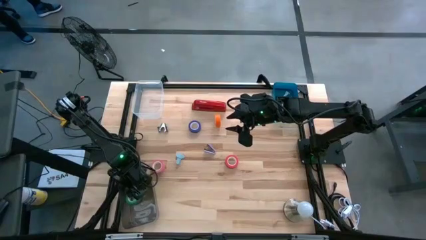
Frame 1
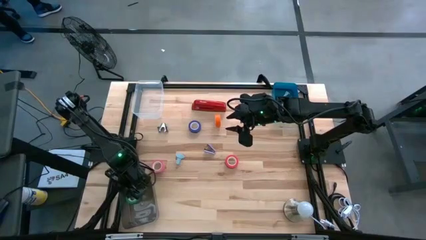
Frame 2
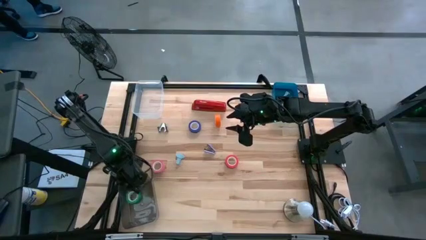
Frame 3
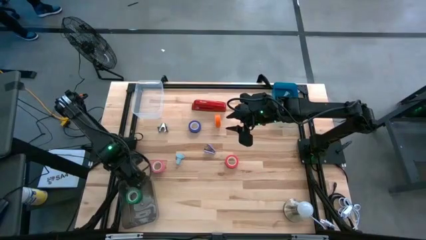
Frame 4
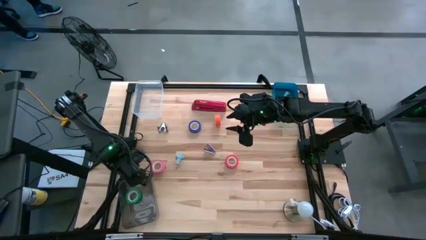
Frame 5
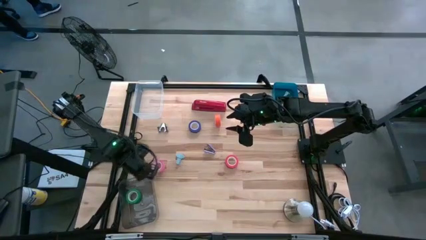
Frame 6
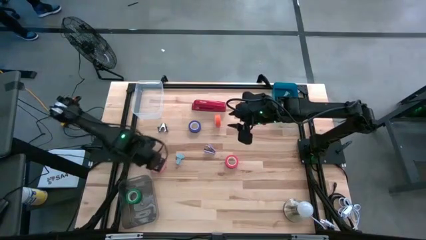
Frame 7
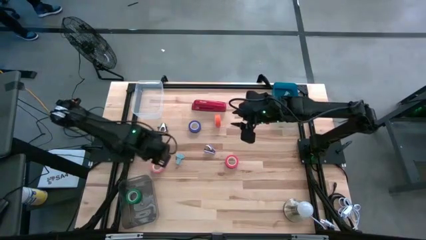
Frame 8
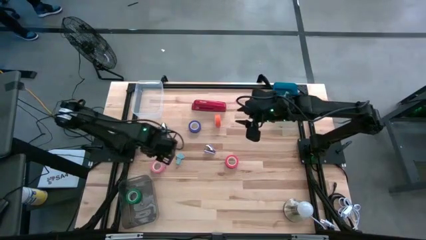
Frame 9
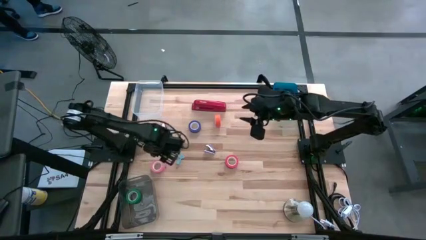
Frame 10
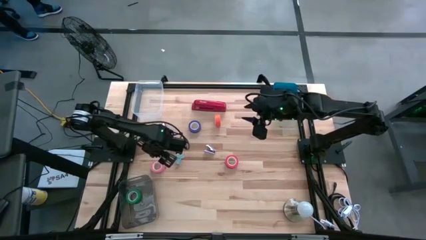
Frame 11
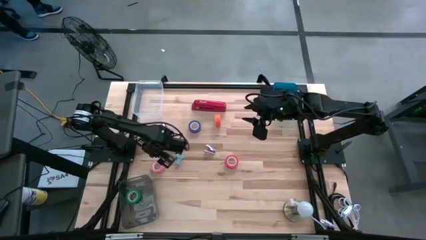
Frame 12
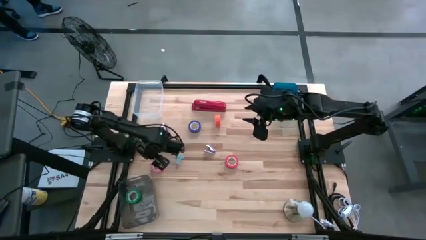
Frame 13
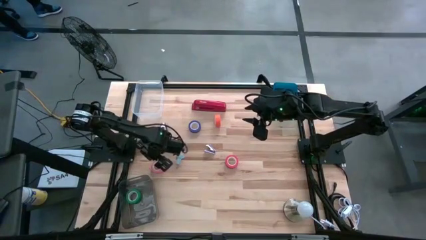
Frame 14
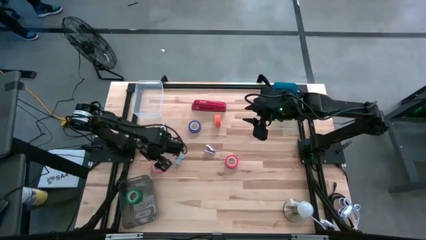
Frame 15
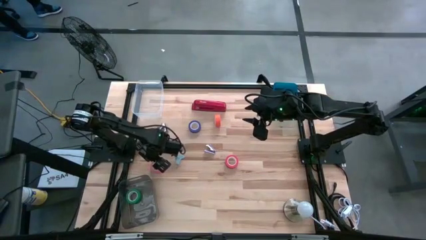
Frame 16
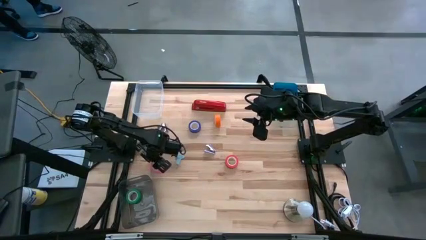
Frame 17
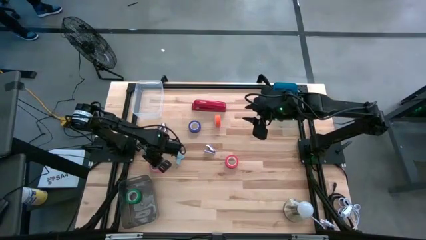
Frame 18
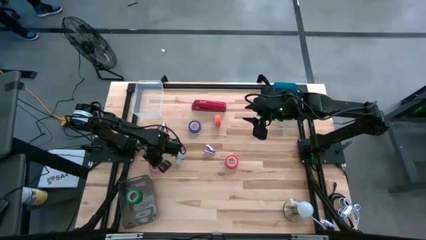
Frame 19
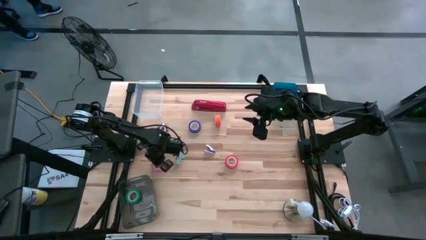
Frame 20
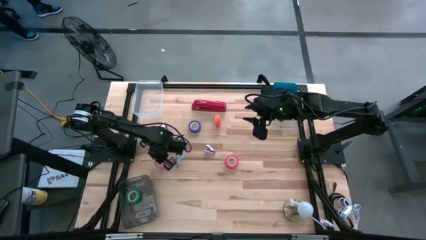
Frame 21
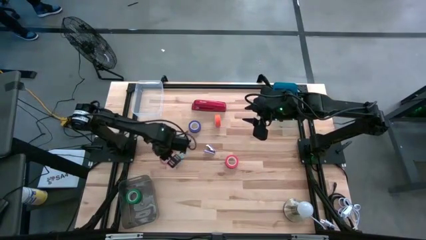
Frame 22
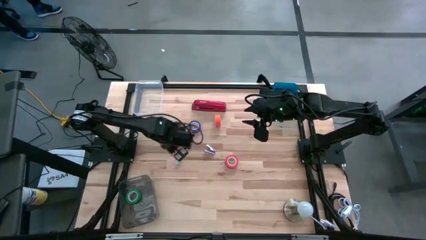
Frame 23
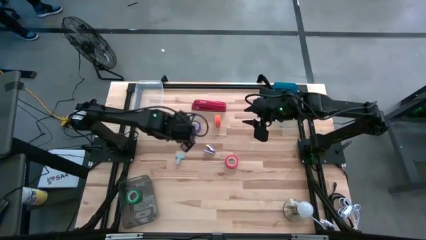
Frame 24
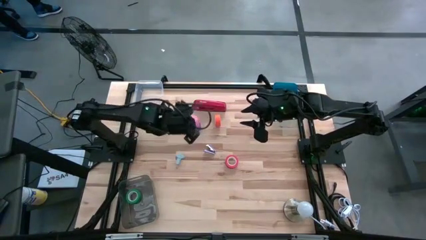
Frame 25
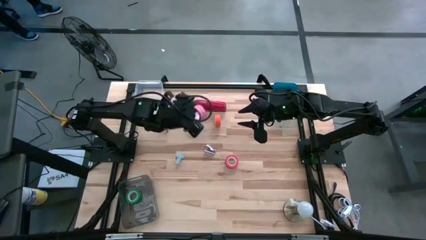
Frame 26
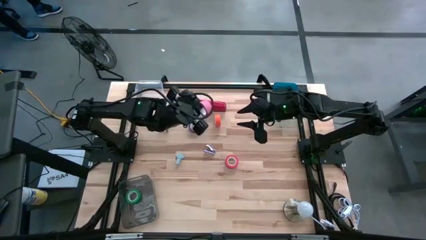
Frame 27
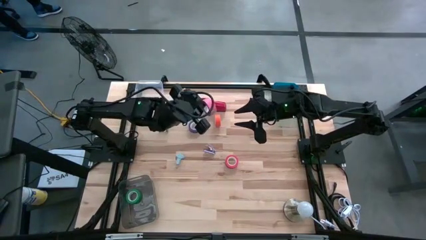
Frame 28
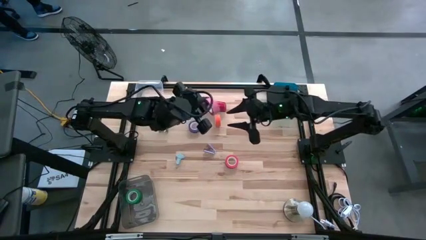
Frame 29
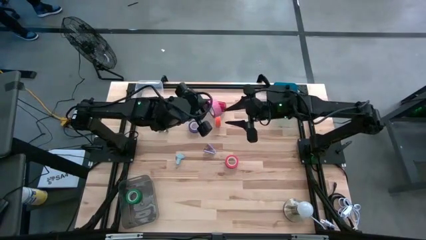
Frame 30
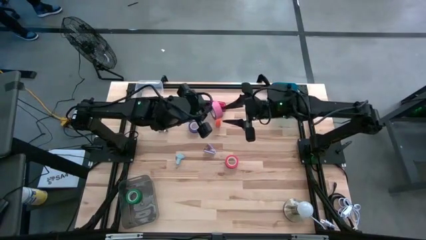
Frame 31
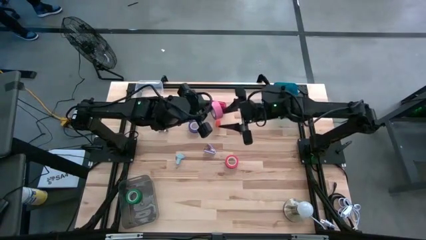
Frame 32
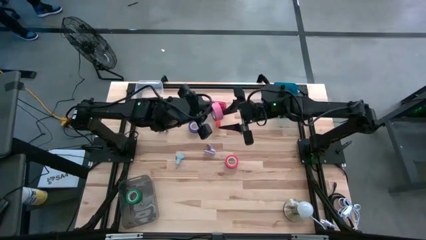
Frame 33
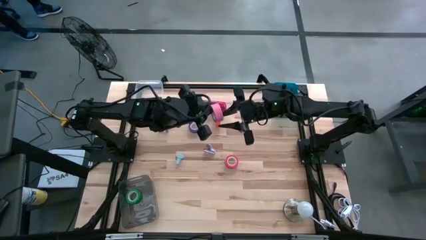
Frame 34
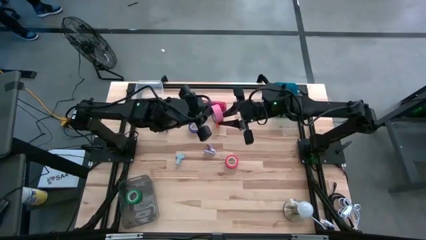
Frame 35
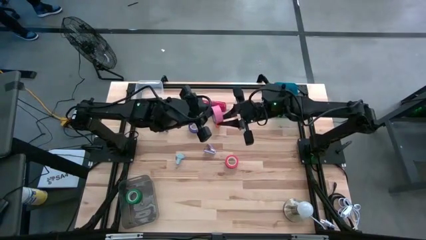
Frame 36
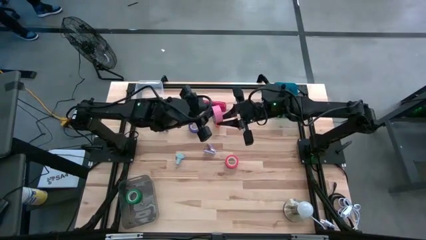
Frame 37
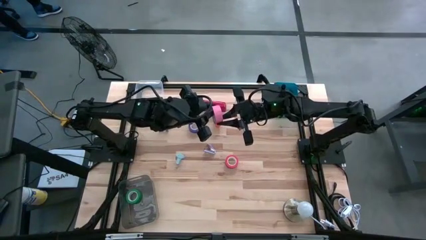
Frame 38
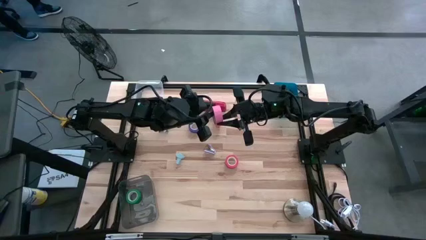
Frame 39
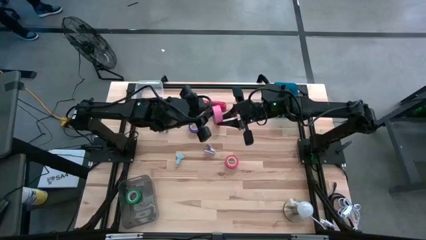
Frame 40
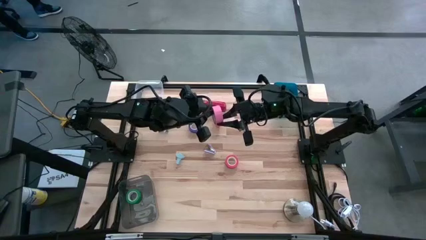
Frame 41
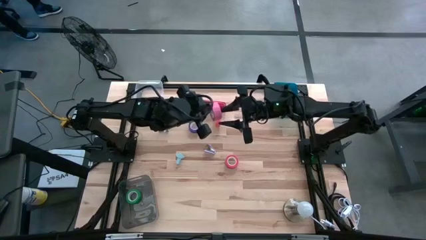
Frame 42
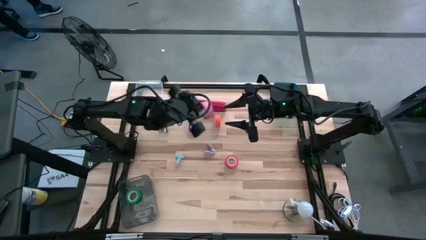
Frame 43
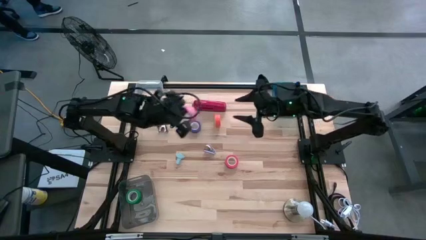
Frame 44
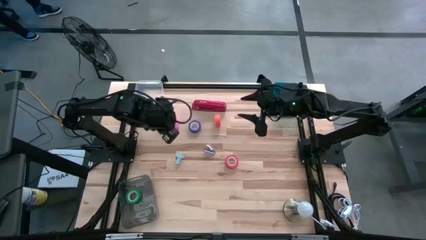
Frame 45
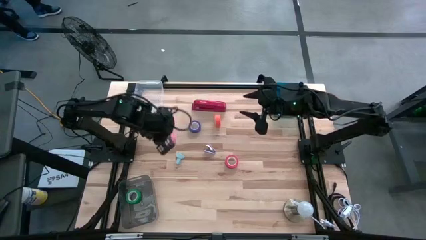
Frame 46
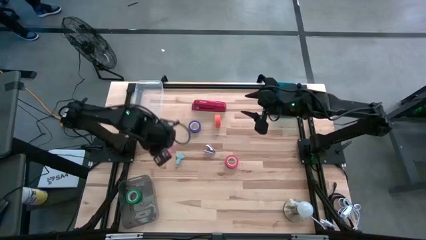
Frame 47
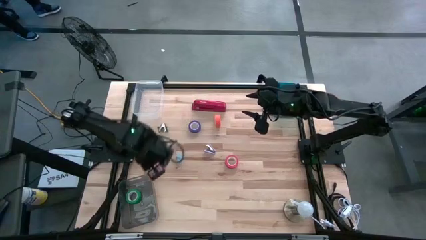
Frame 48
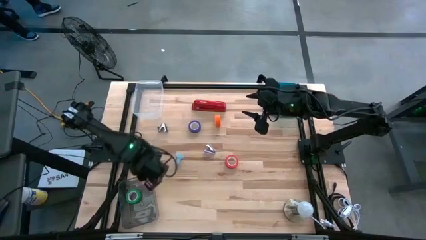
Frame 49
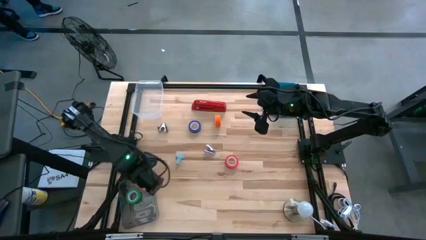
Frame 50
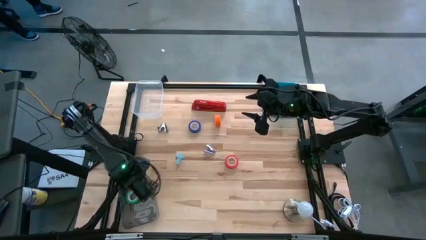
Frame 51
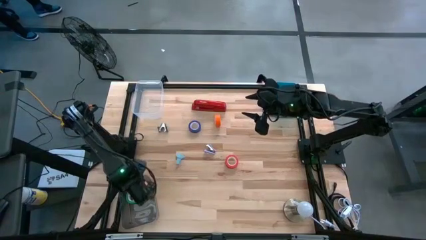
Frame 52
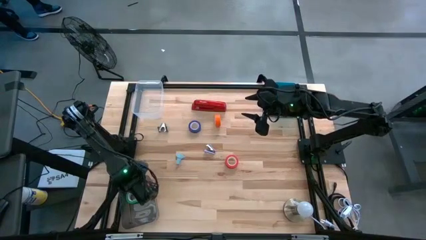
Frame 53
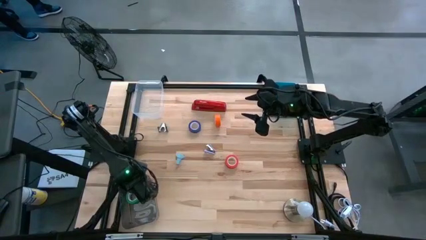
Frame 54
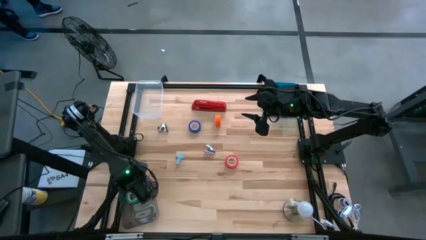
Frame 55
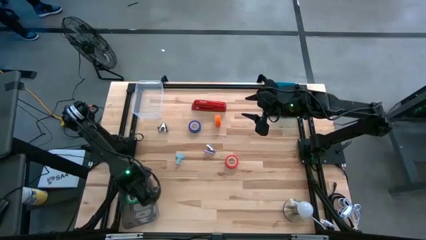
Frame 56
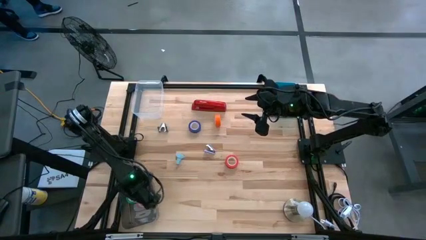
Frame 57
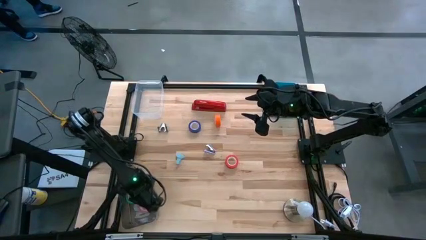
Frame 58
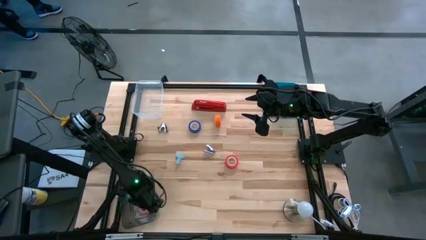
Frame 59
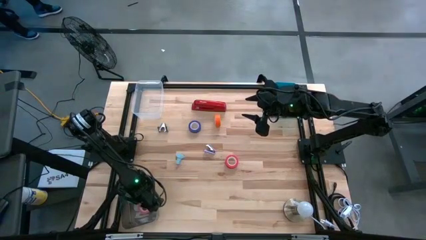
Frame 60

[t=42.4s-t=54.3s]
Task: Pick and place Stapler, Stapler remover, tape
Put the pink tape into the black bin
